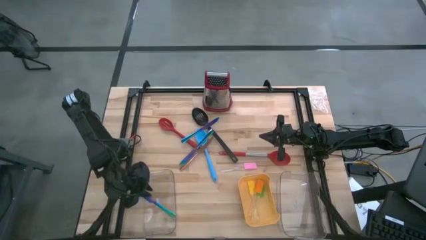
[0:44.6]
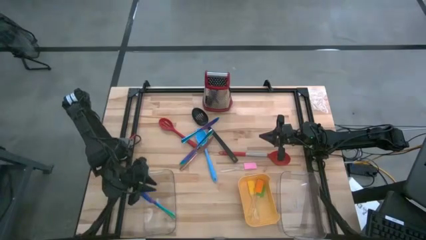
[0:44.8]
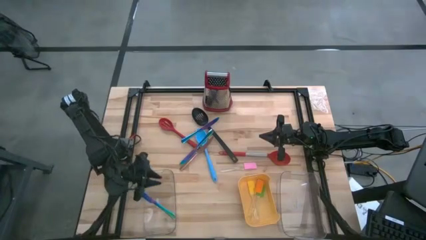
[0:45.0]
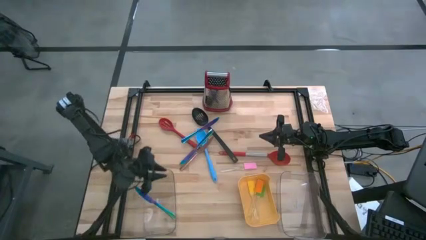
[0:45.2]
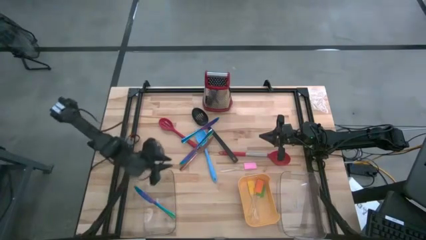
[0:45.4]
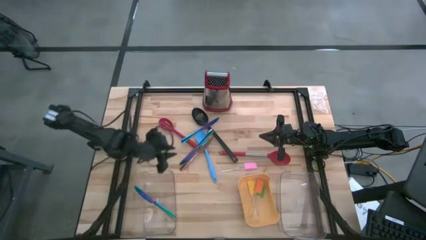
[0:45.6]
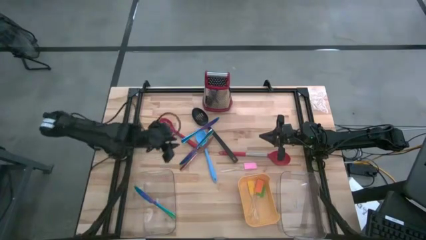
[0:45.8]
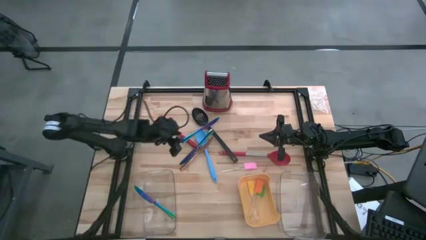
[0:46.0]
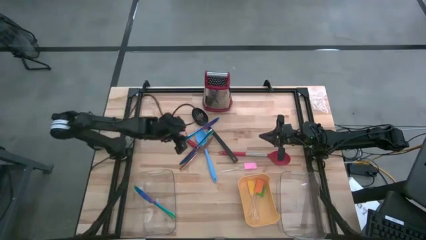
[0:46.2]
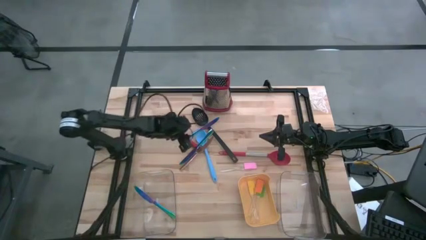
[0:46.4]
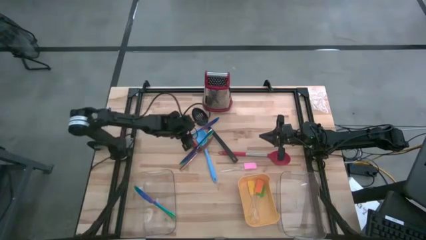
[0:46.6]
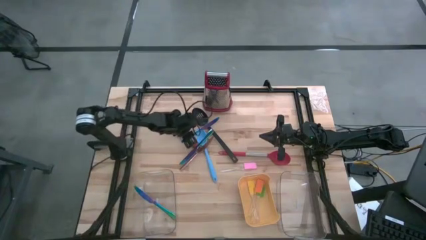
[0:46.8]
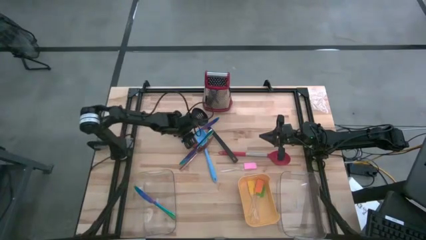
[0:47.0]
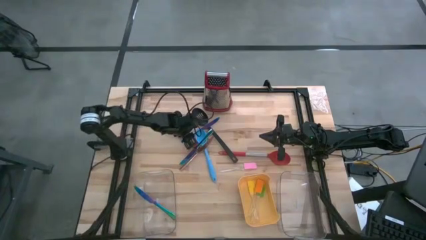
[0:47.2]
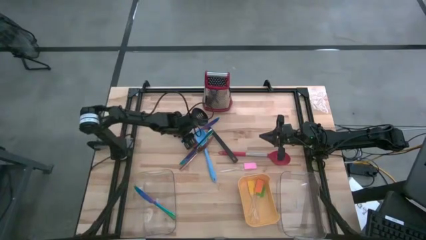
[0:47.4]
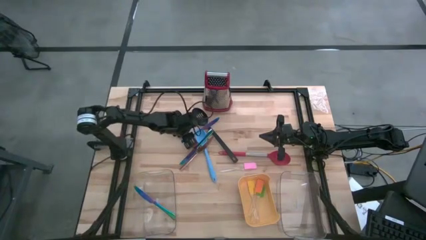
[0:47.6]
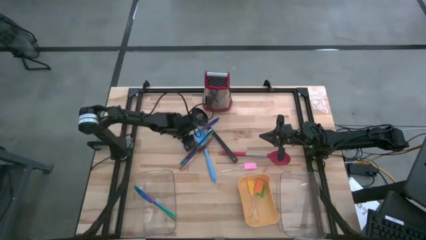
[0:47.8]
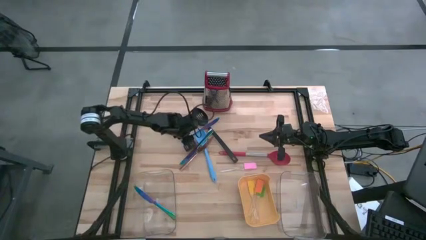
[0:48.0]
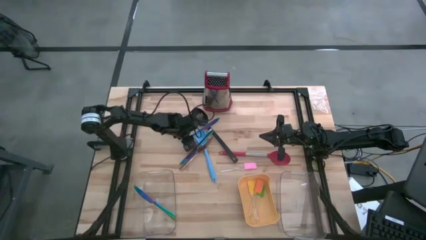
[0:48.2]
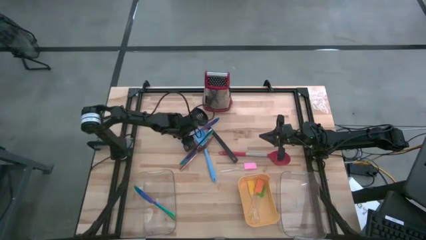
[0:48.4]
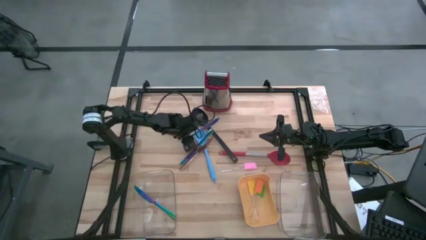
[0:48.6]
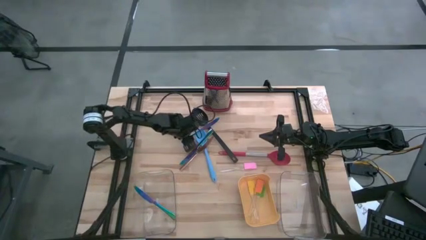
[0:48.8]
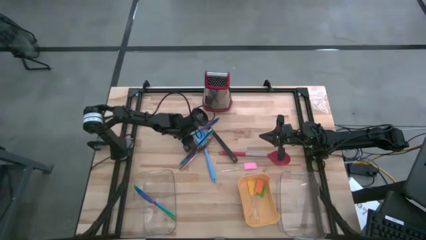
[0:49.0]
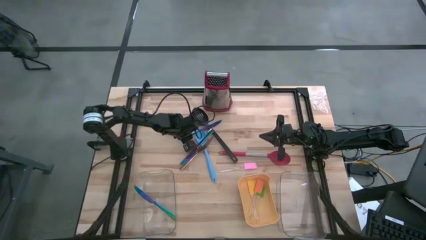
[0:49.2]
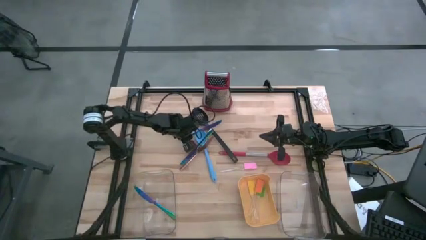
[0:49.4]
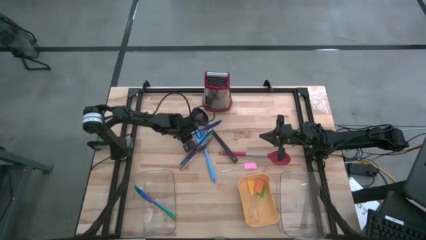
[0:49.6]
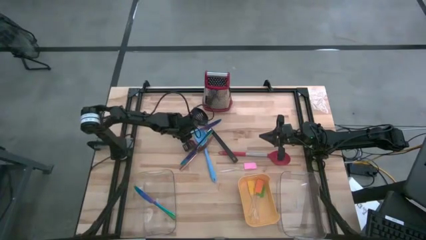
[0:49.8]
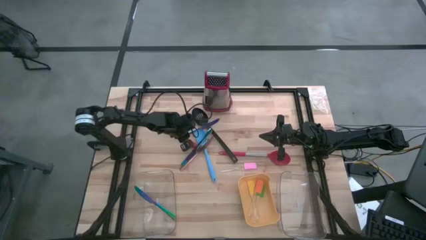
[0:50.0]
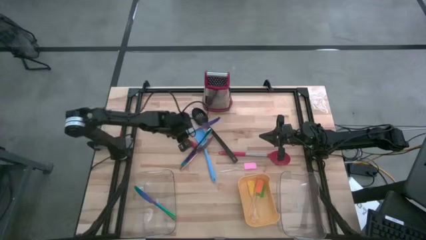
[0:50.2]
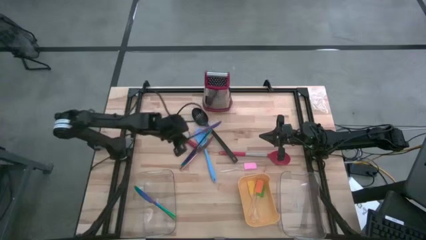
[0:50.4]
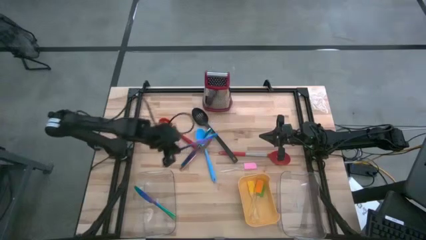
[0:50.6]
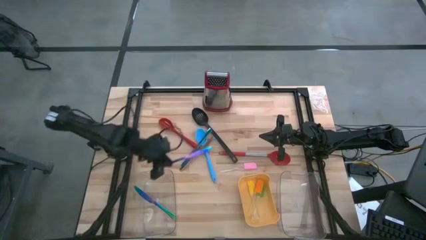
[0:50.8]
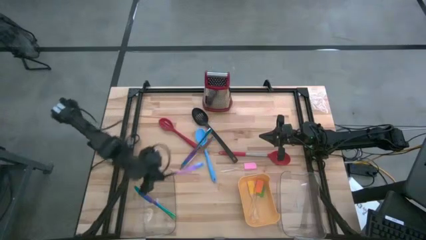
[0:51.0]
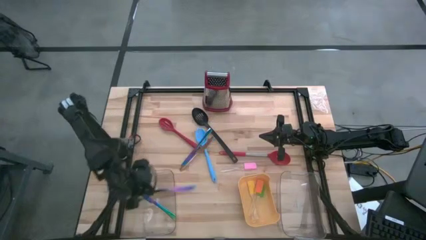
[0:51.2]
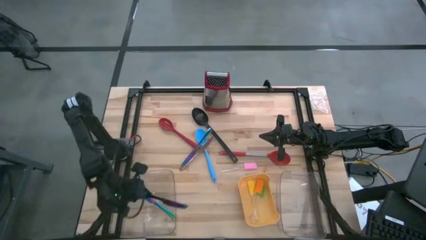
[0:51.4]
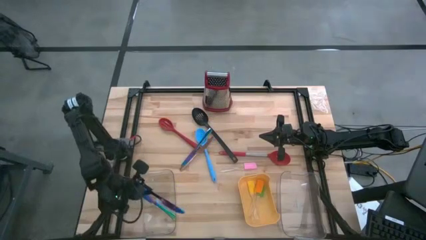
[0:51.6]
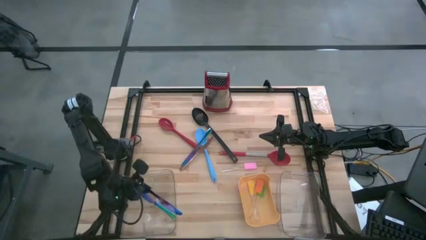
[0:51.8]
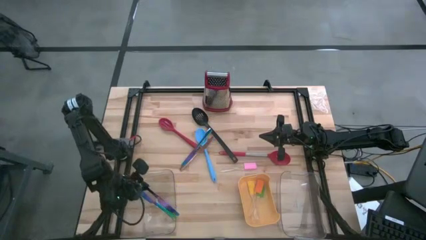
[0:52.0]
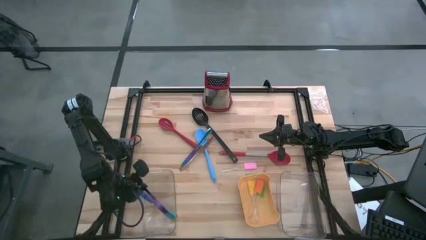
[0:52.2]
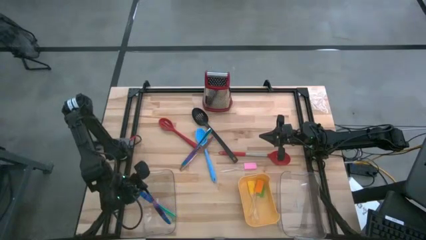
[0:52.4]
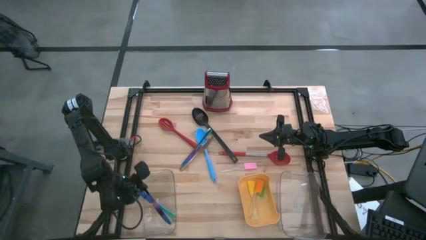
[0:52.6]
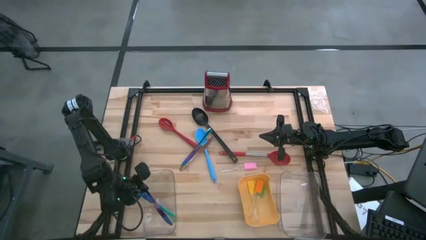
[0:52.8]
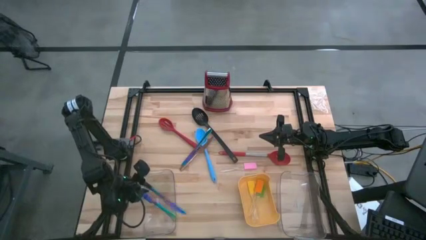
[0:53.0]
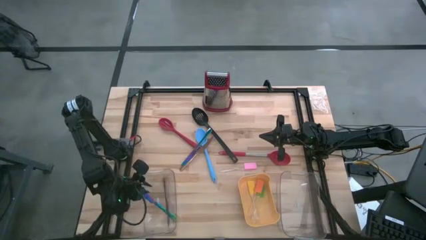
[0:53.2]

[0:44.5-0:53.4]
Task: Pick & Place Kitchen Items
Put the top iridescent knife into the left transparent bin

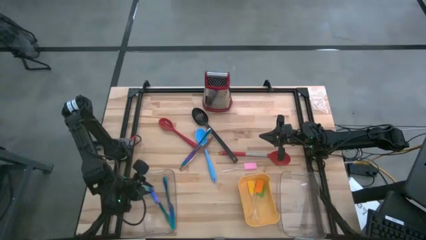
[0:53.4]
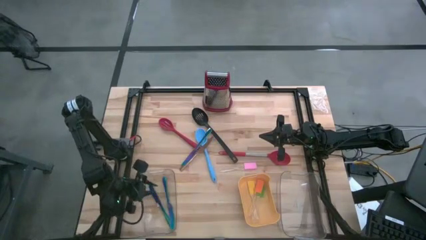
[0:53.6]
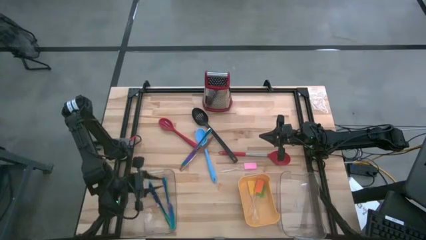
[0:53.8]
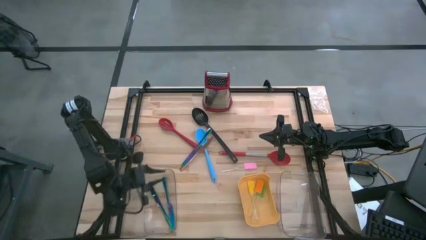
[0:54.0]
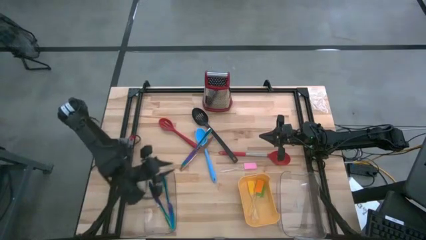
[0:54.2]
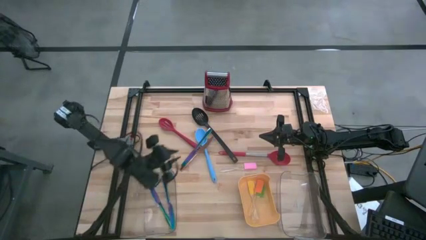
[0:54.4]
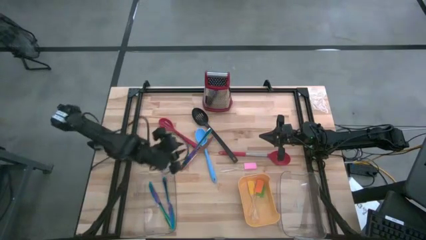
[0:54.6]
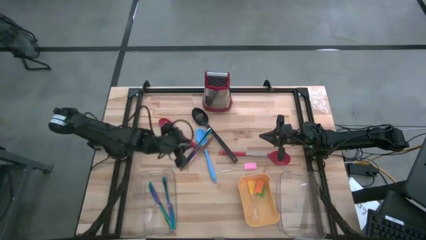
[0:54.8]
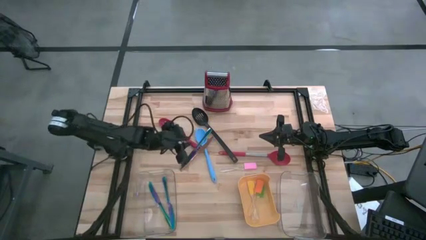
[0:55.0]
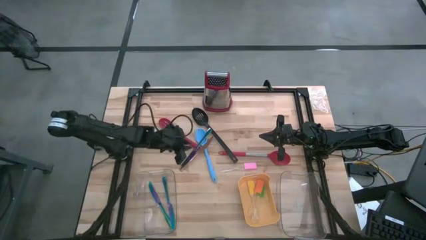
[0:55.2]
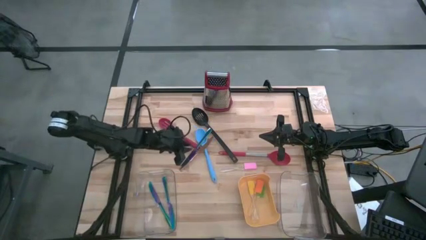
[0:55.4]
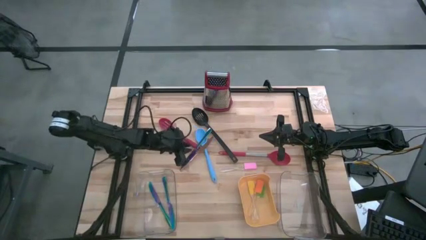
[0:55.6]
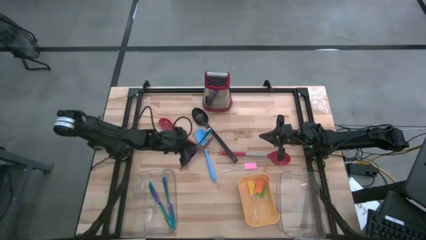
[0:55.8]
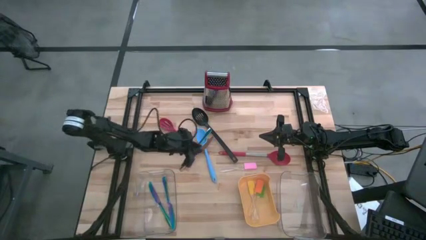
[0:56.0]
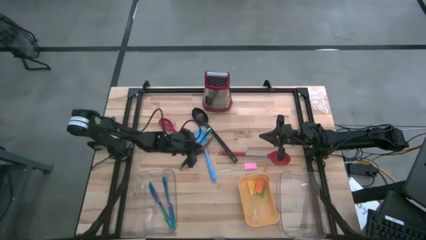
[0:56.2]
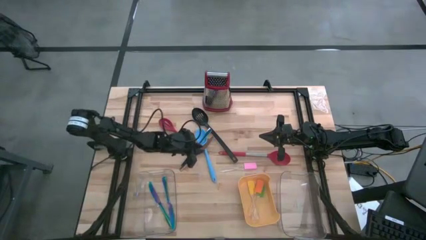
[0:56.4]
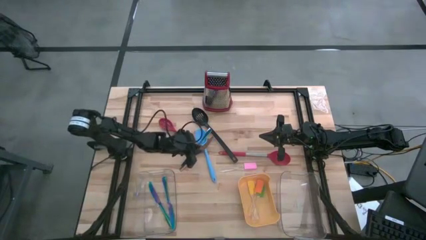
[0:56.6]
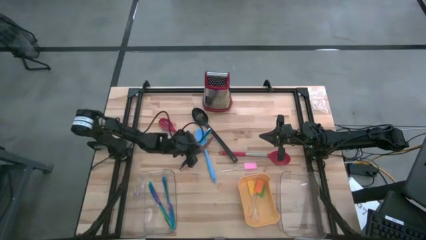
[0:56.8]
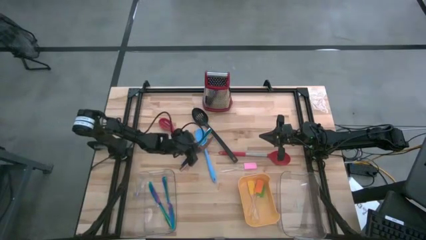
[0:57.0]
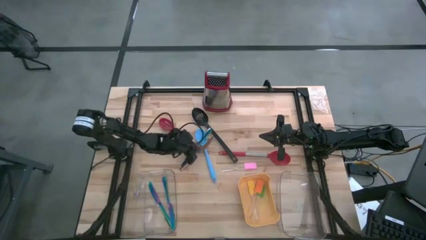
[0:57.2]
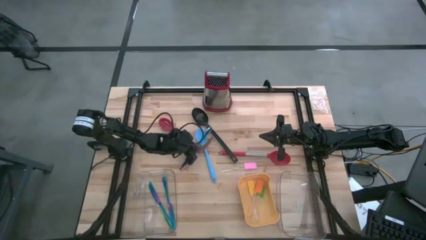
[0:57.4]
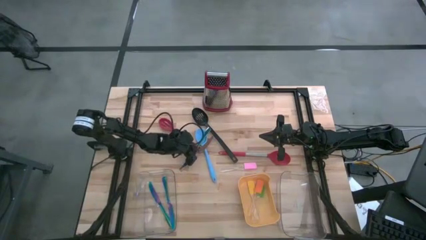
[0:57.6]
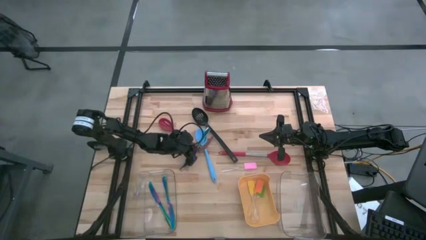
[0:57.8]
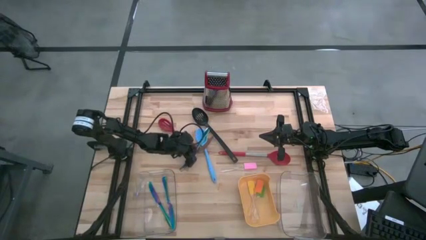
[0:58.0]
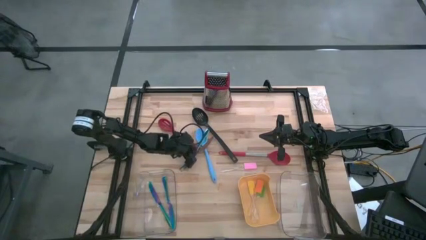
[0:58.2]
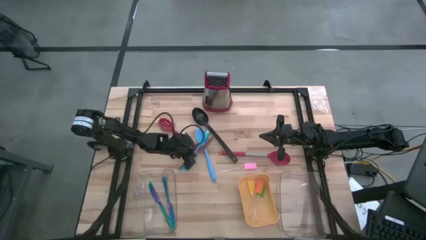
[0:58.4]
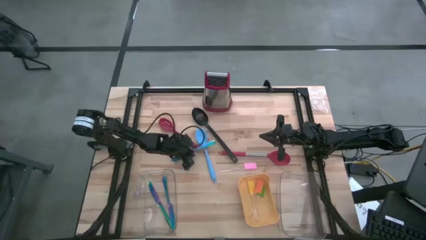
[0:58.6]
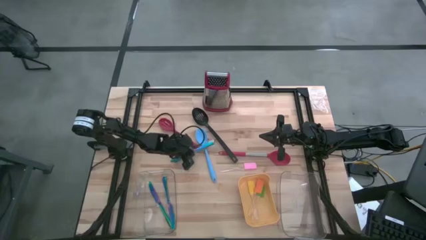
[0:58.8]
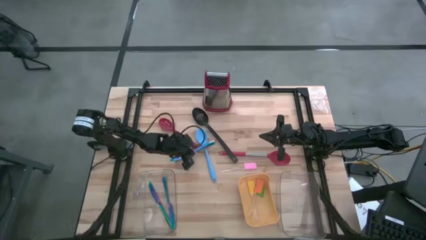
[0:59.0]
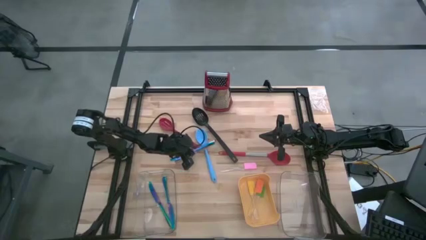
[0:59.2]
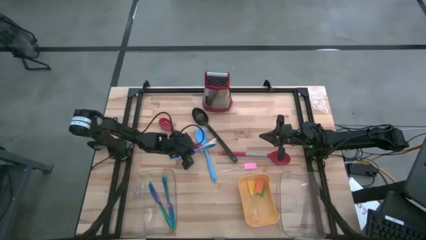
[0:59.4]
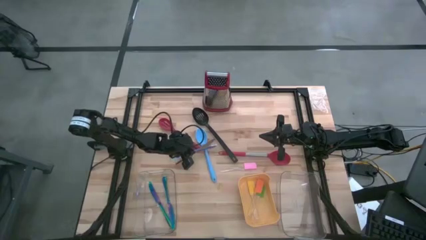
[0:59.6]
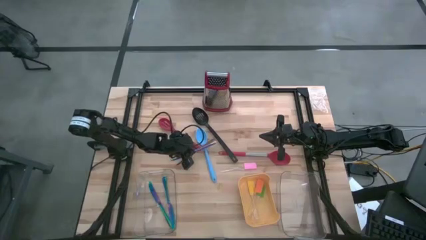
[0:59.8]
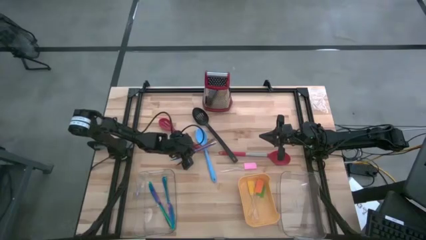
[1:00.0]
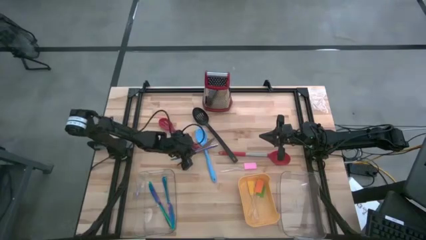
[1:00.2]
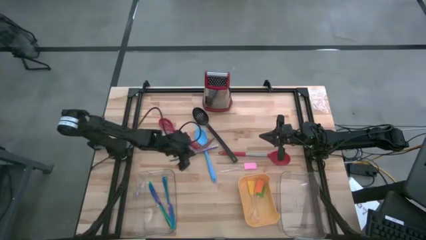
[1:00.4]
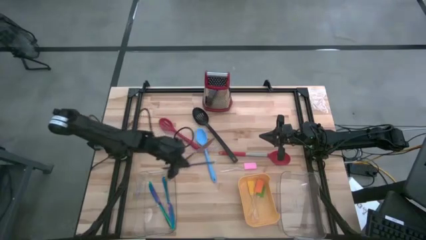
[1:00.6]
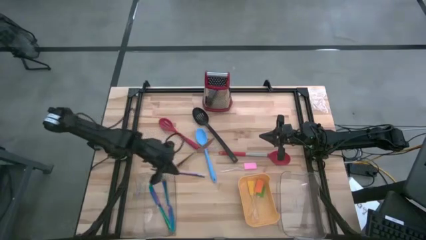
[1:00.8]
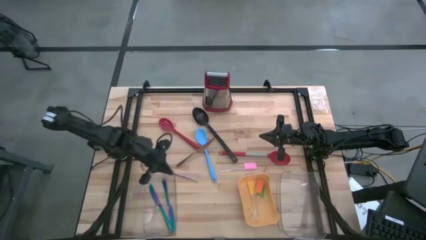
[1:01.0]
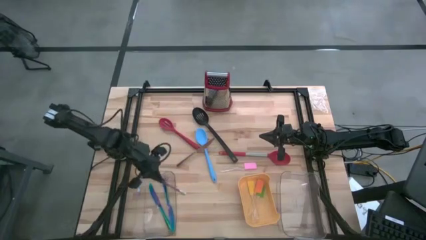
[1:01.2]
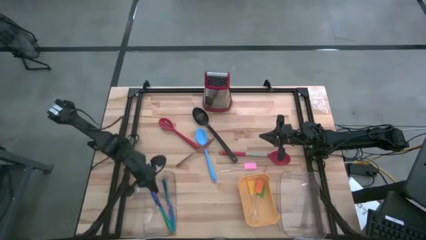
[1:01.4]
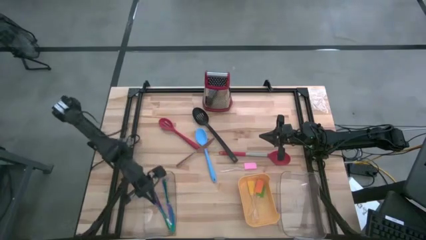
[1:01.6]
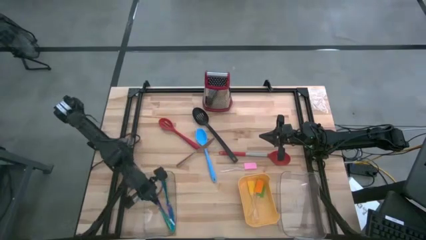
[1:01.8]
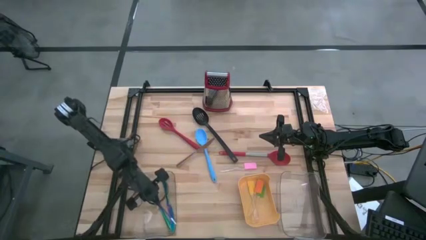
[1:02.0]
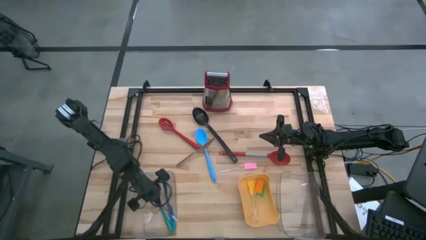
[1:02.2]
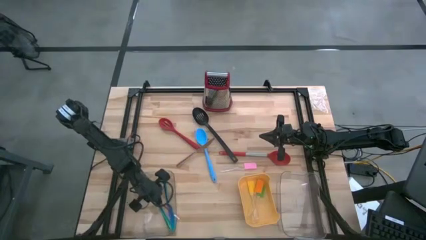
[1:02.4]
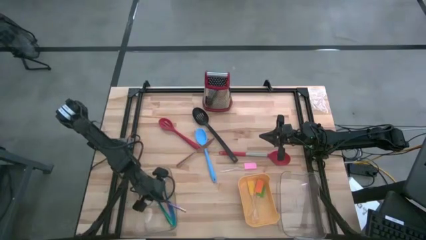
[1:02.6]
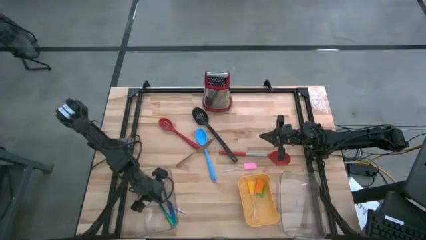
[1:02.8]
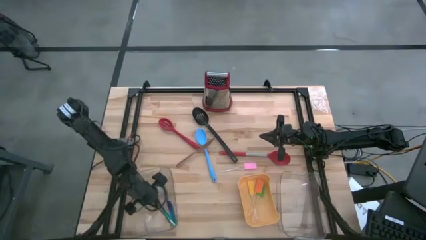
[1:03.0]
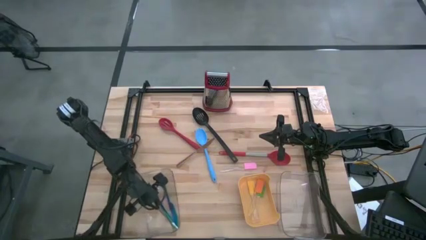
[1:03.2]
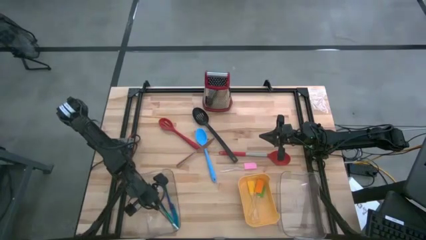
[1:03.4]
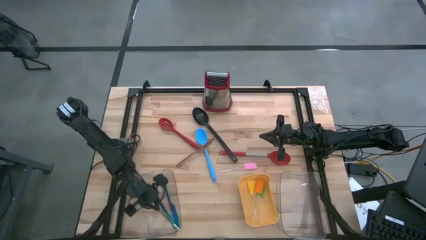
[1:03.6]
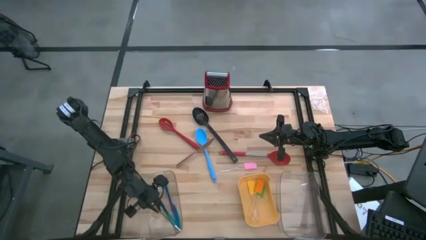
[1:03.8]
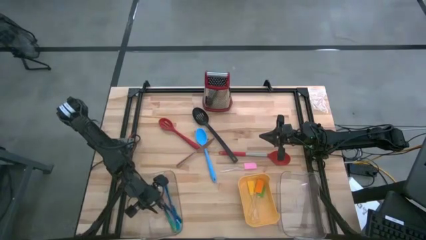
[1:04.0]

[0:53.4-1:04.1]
Put the iridescent knife into the left transparent bin
